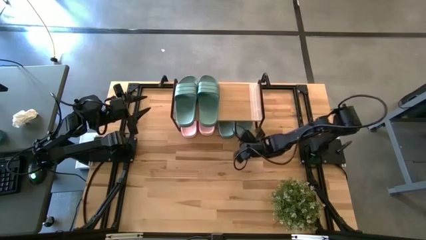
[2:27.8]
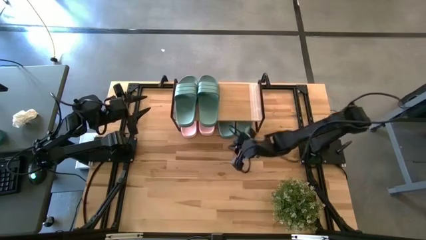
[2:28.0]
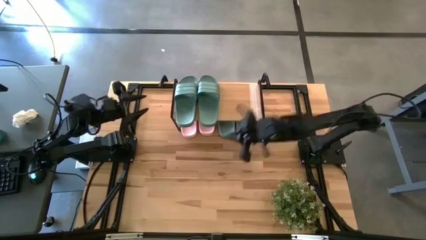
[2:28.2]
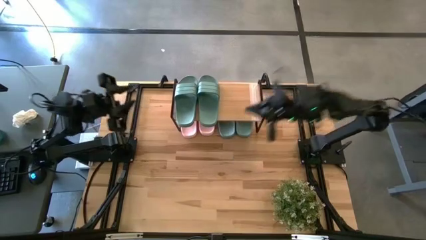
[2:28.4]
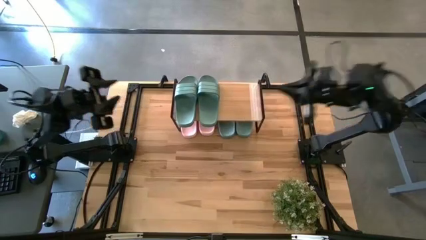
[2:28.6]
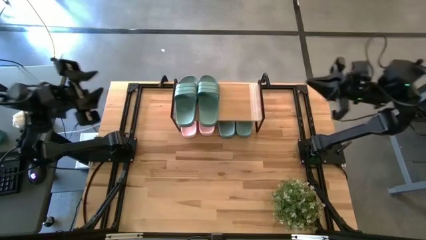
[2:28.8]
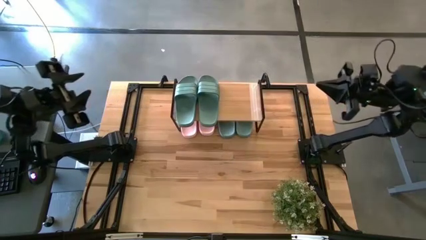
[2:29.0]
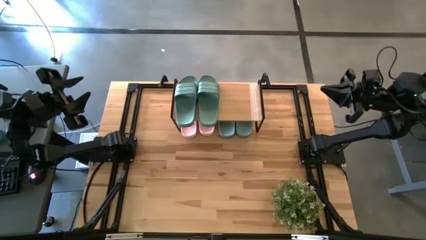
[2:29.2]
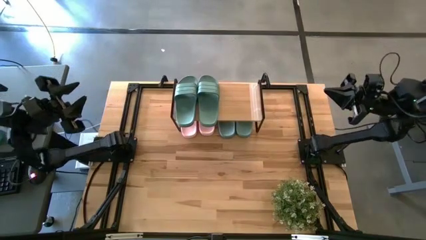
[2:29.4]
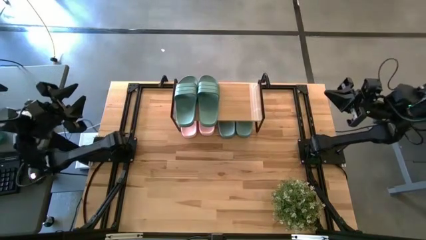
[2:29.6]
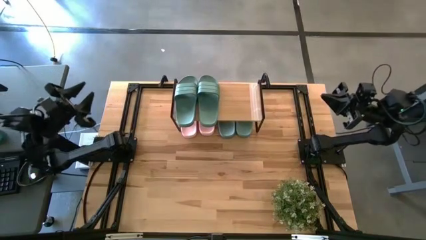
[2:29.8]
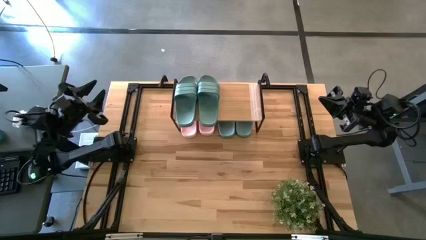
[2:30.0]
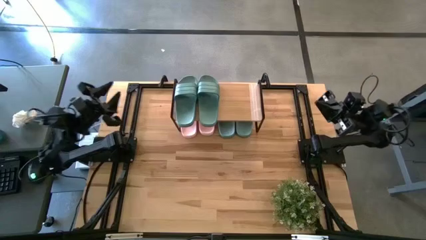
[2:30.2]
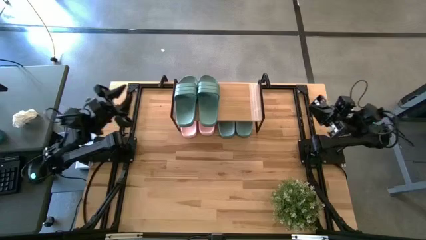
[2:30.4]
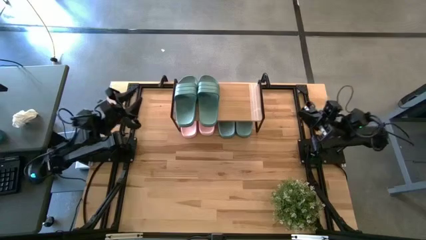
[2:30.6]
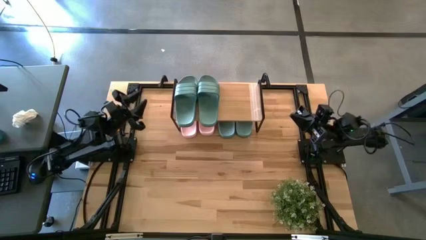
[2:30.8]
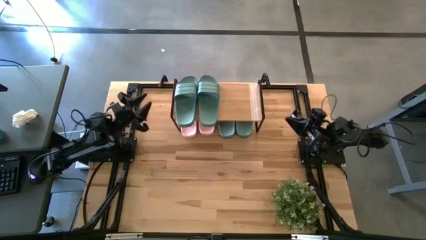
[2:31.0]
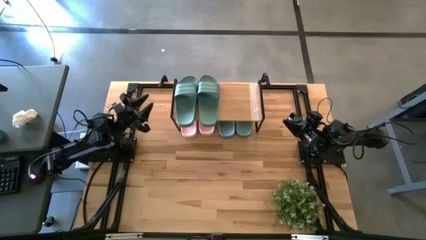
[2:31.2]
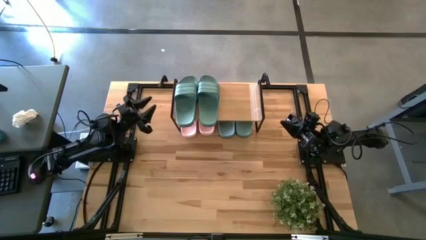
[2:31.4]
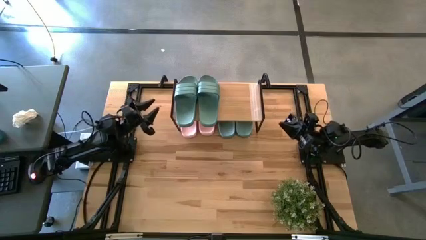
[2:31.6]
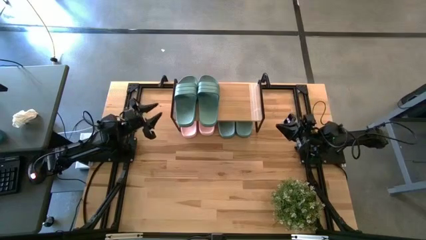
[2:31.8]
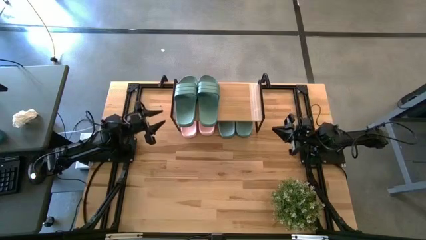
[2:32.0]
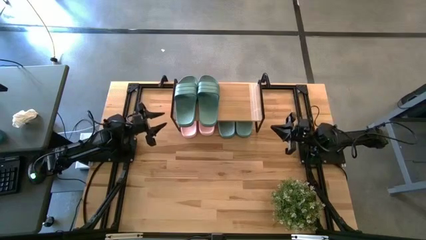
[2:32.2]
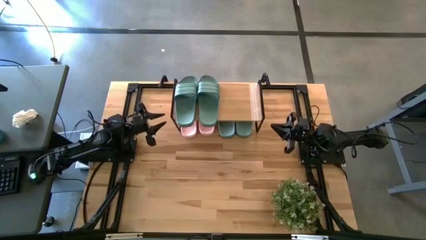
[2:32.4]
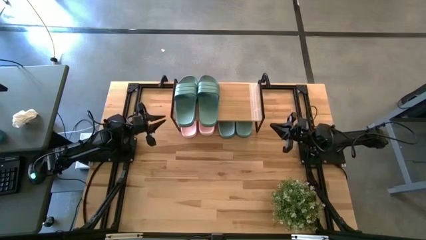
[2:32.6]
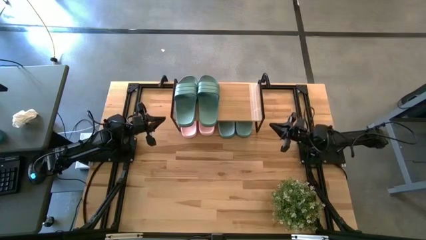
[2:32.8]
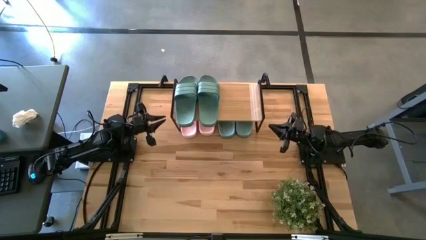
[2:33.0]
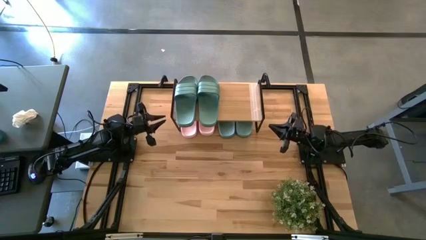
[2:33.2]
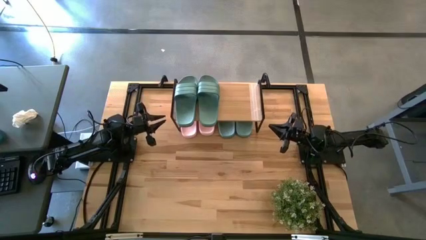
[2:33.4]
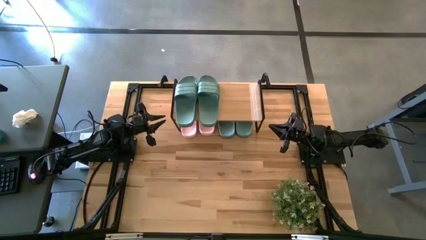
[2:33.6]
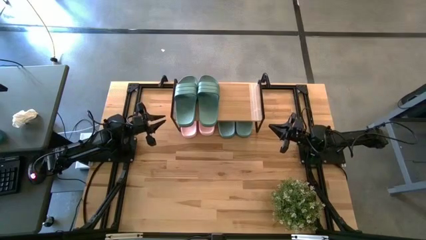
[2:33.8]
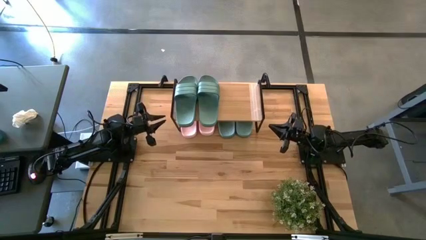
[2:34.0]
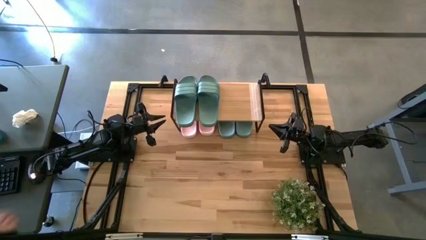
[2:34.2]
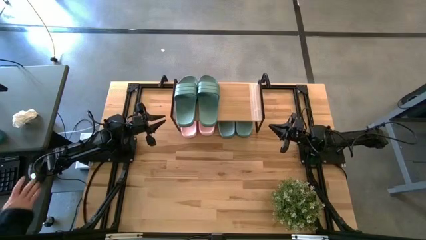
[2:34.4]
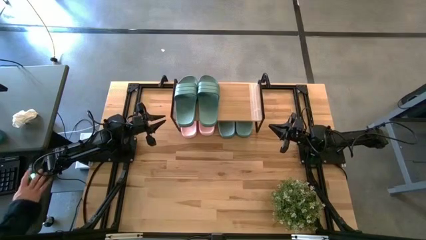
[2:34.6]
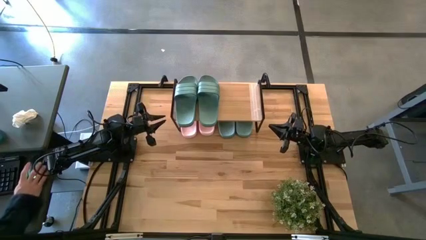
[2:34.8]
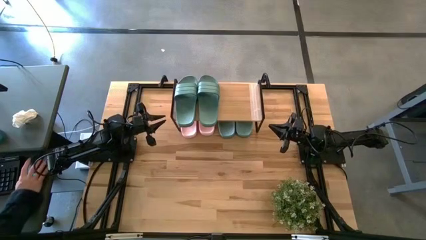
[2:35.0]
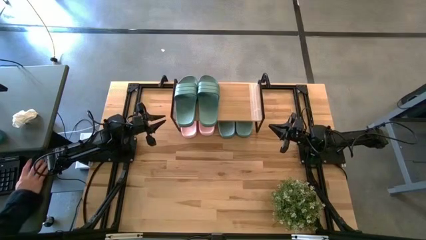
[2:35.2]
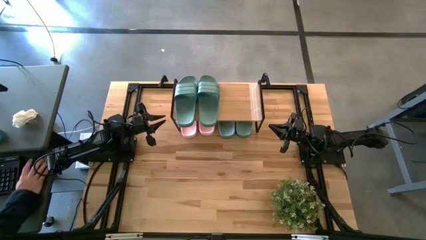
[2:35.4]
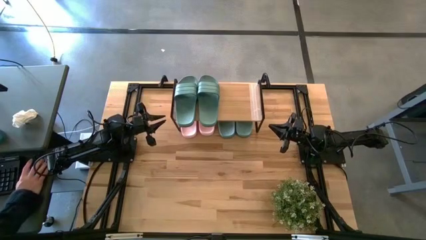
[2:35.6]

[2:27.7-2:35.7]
Task: Pick and place slides into the shelf
Return to Home Position

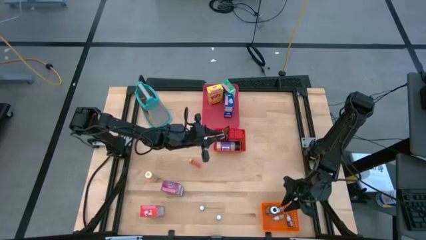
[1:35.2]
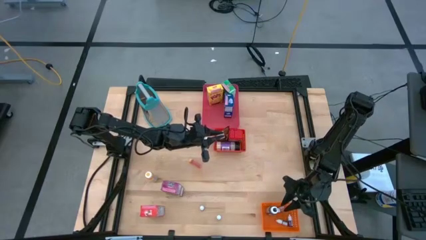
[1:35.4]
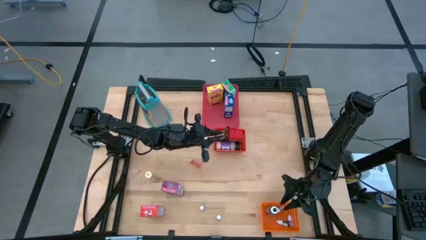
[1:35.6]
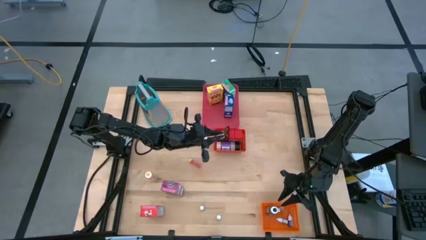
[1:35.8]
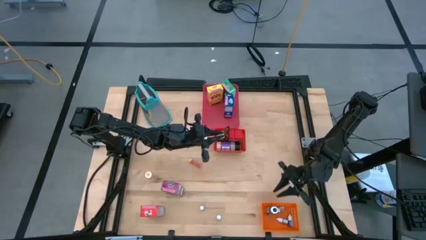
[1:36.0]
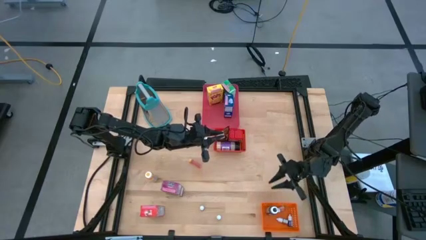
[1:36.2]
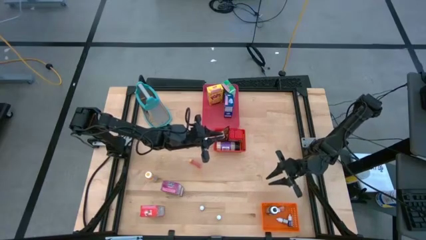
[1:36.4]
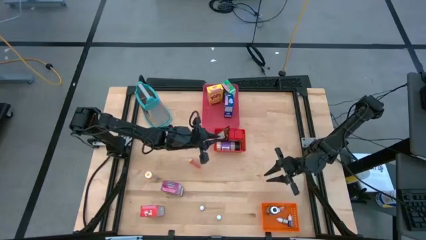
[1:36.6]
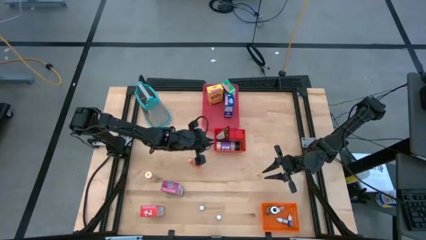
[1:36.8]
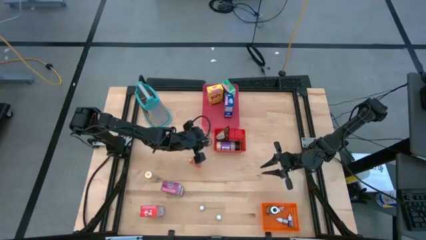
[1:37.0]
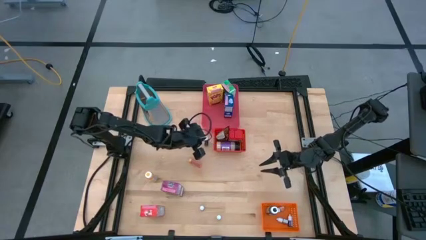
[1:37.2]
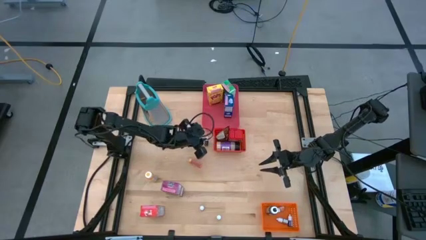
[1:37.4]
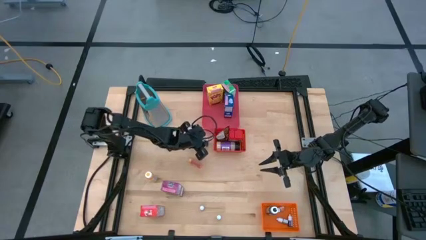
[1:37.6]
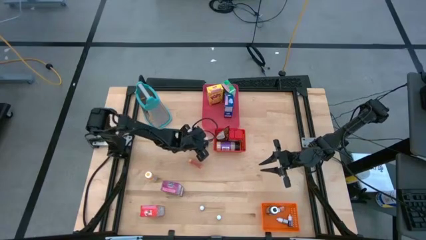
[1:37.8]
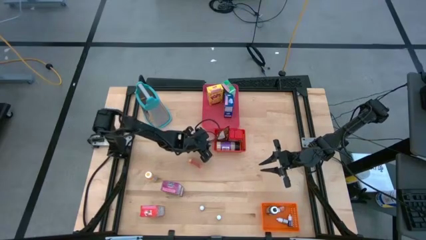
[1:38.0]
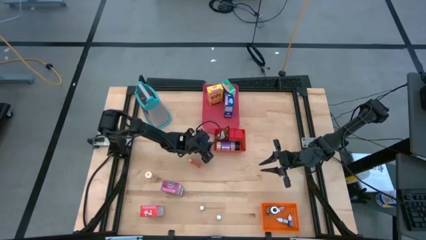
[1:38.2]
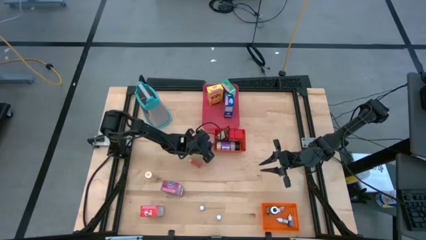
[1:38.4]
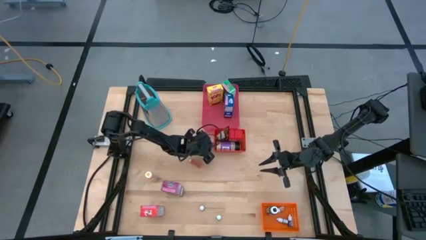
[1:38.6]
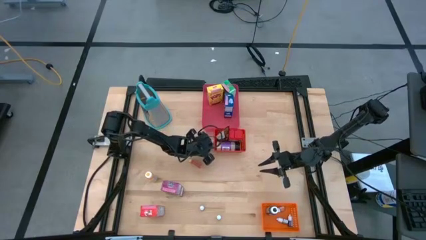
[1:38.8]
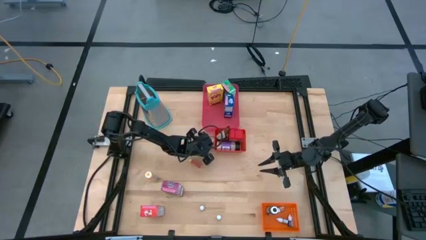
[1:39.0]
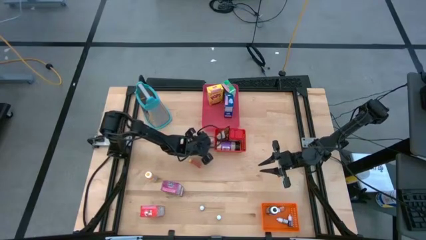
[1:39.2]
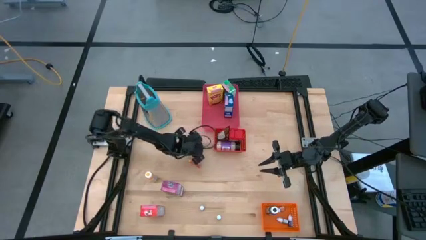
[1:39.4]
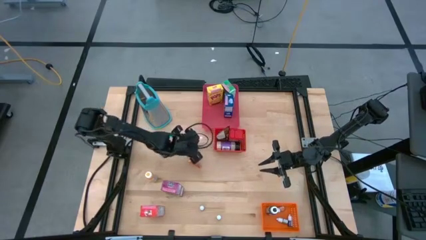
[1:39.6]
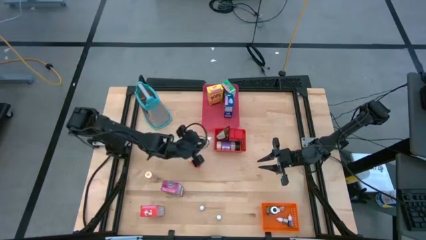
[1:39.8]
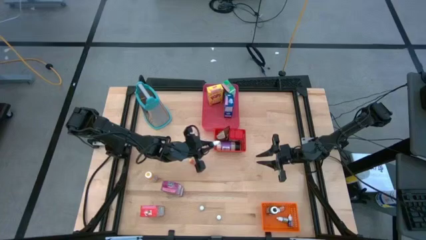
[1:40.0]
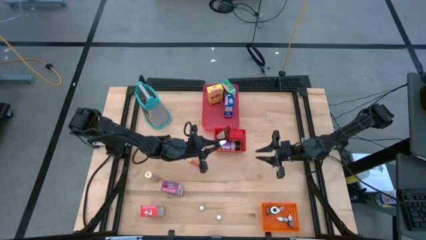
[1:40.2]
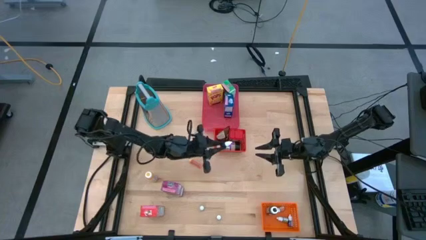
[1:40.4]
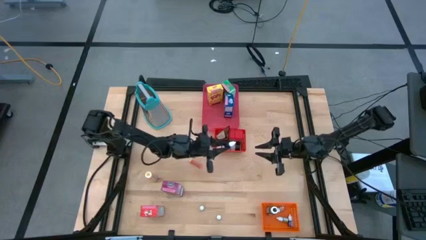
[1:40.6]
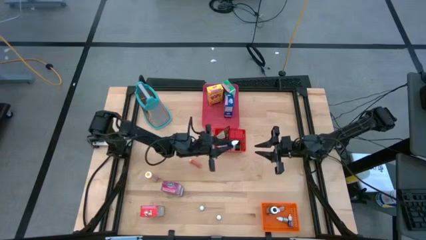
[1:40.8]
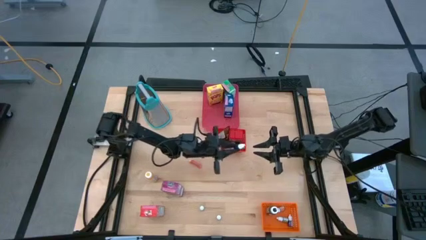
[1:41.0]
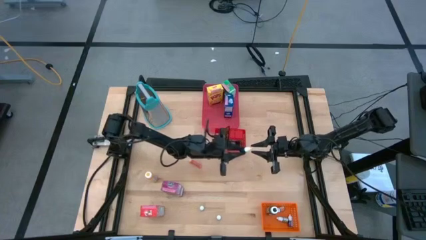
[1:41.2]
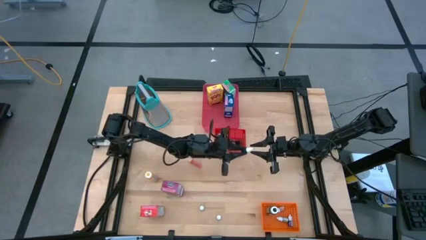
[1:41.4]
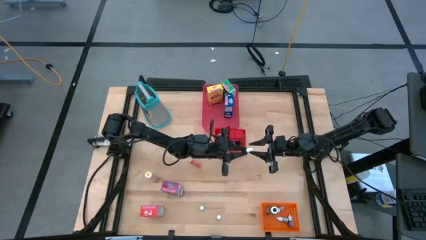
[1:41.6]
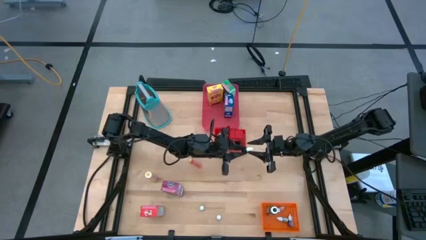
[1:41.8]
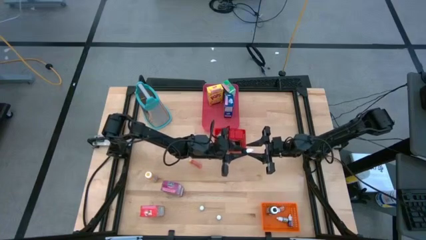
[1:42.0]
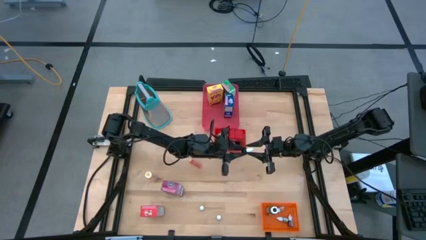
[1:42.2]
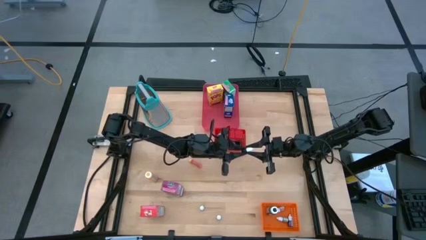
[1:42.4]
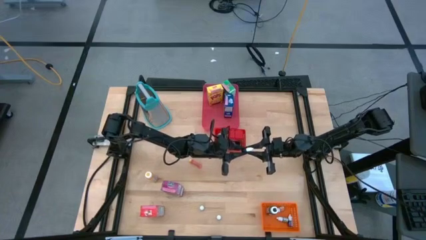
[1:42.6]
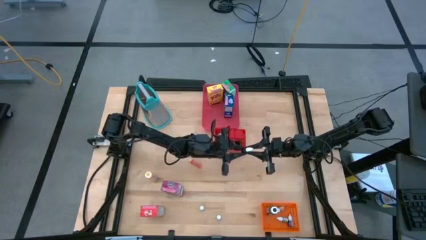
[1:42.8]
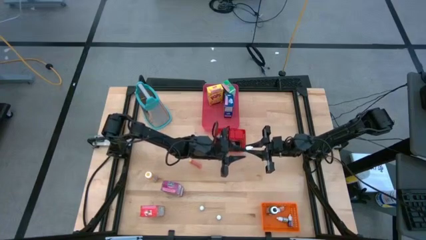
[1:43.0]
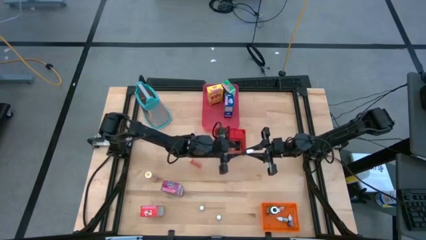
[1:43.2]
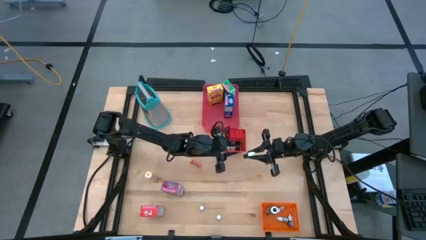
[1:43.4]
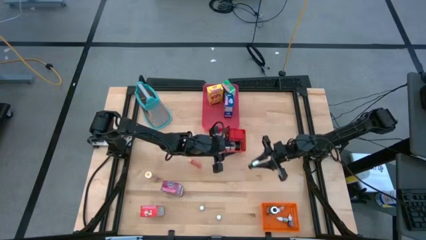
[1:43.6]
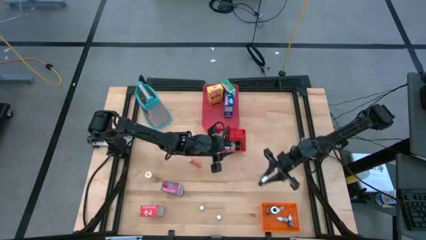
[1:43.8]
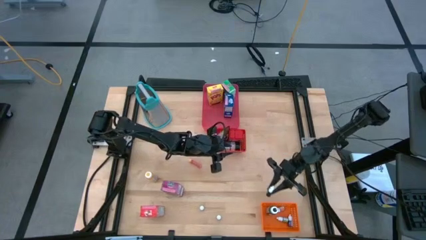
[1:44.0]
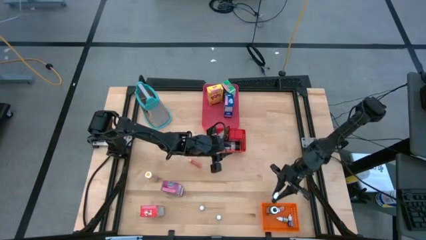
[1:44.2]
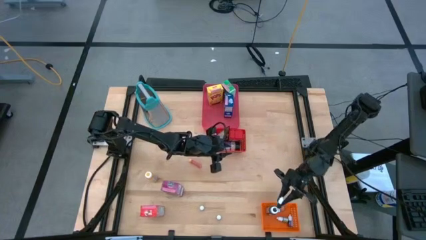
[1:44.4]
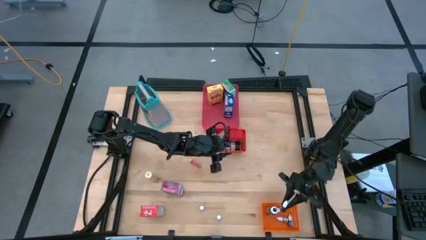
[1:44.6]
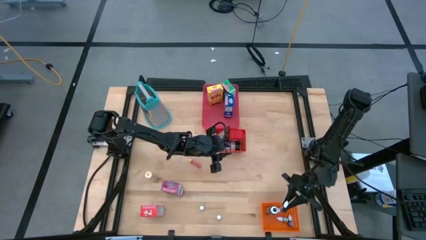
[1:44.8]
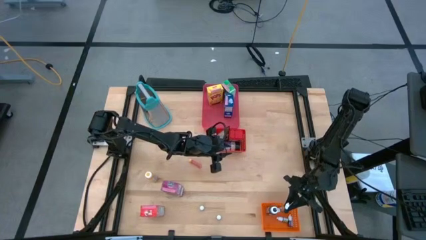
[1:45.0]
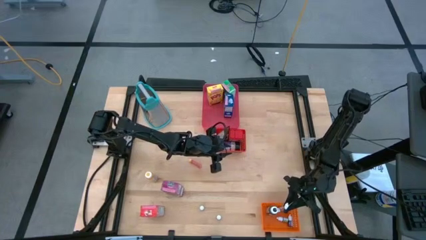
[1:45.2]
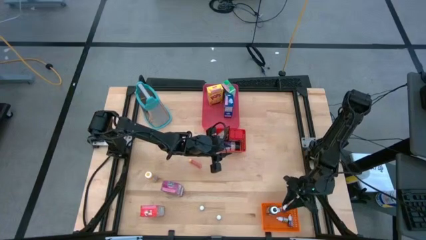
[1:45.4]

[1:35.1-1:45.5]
Task: Pick & Place Kitchen Items
Put the top brown food coloring bottle into the orange bin
